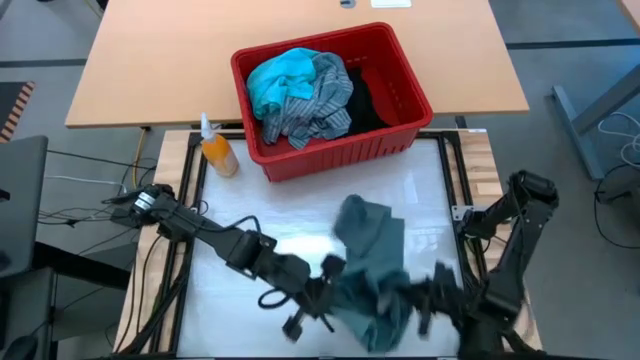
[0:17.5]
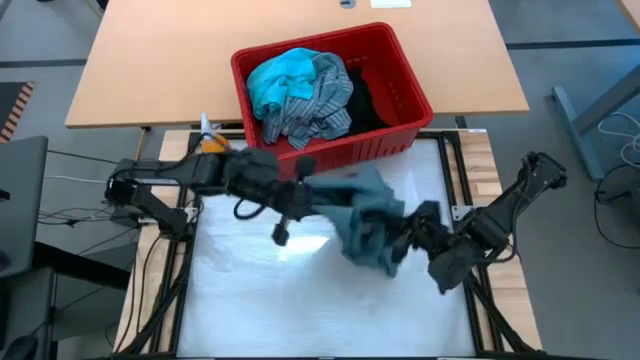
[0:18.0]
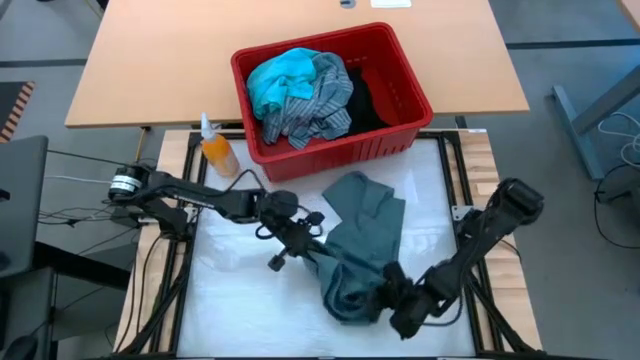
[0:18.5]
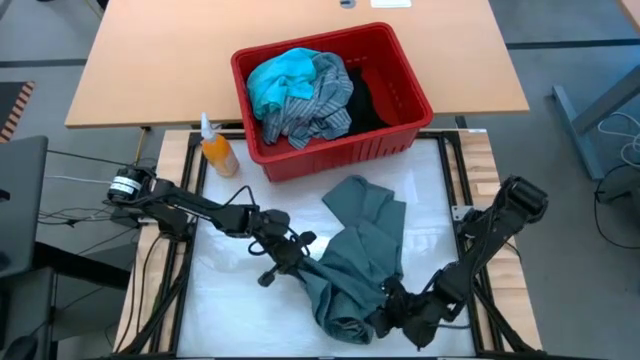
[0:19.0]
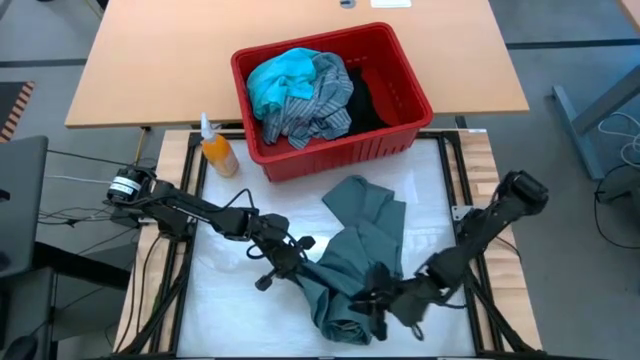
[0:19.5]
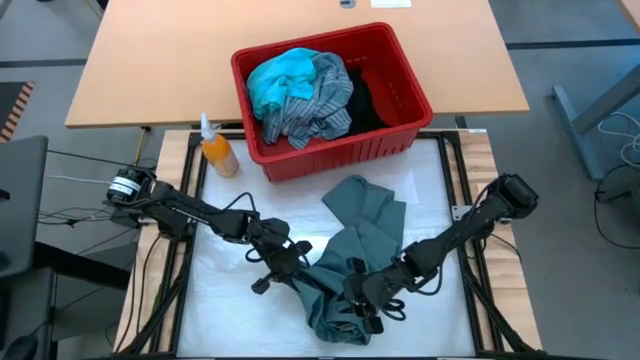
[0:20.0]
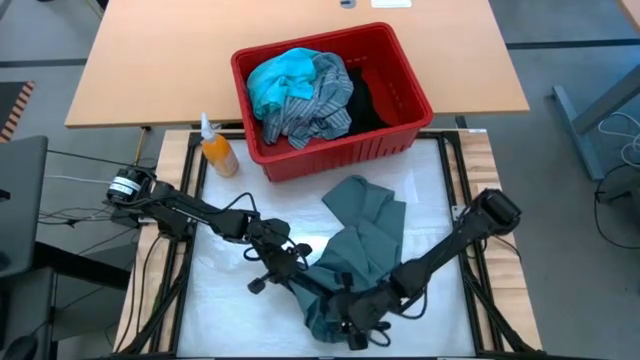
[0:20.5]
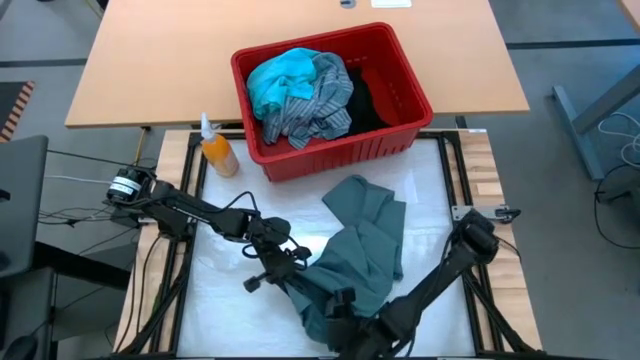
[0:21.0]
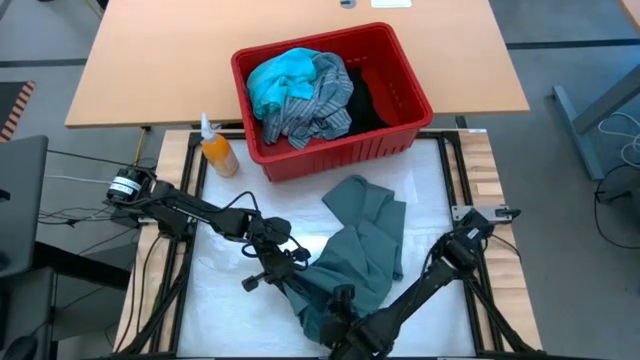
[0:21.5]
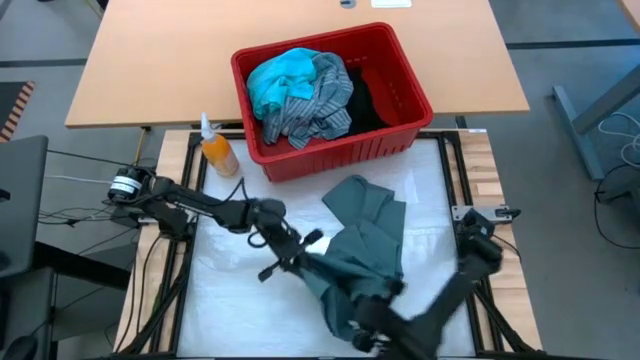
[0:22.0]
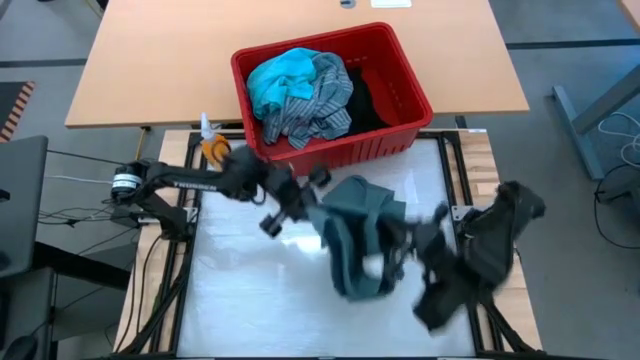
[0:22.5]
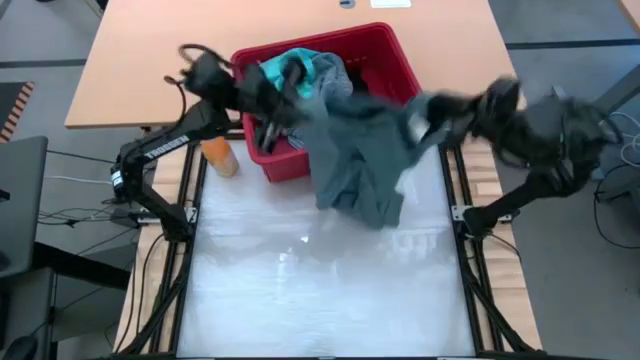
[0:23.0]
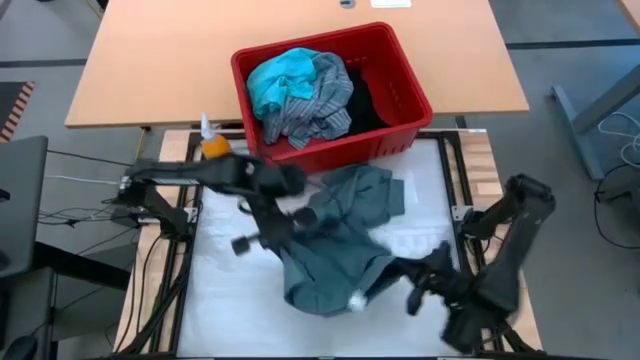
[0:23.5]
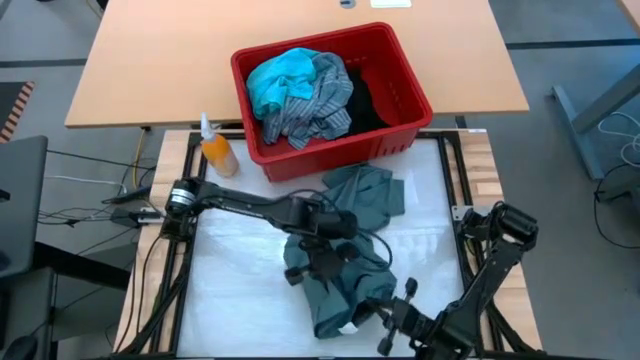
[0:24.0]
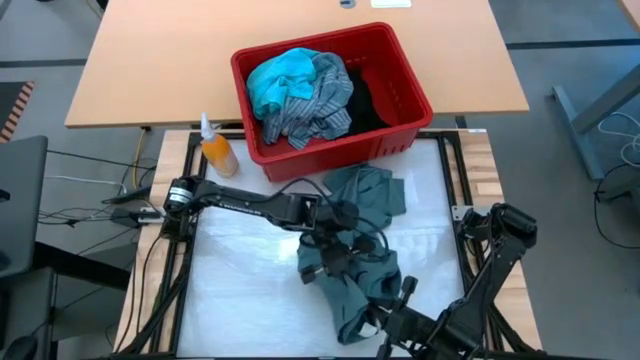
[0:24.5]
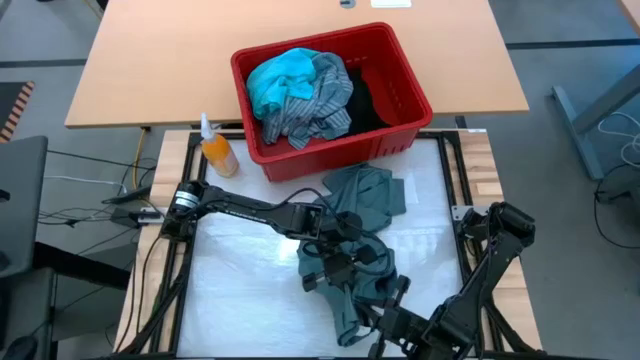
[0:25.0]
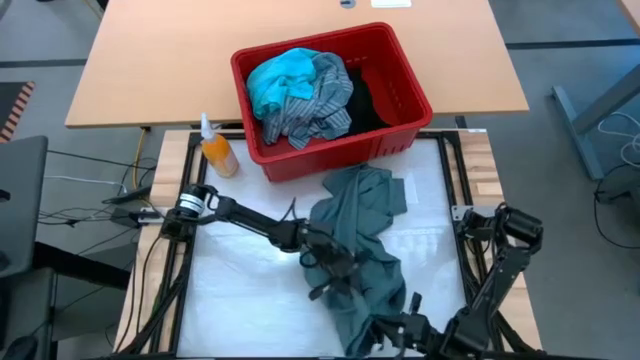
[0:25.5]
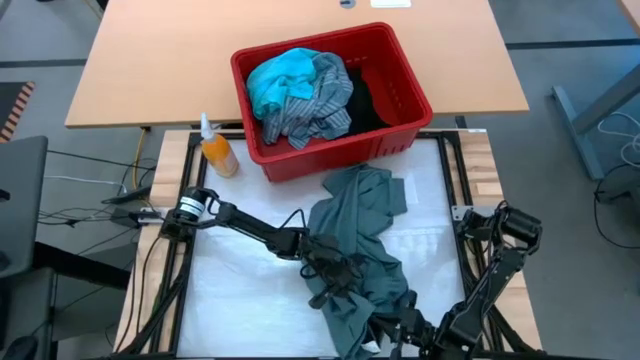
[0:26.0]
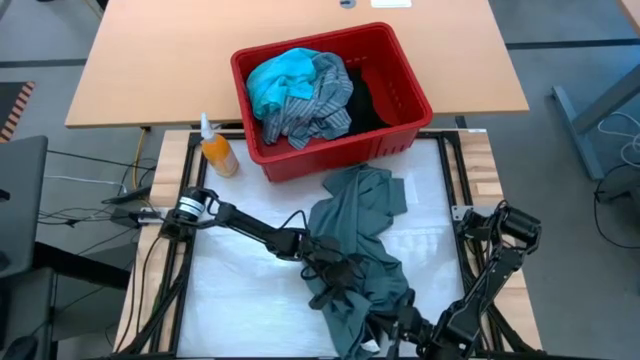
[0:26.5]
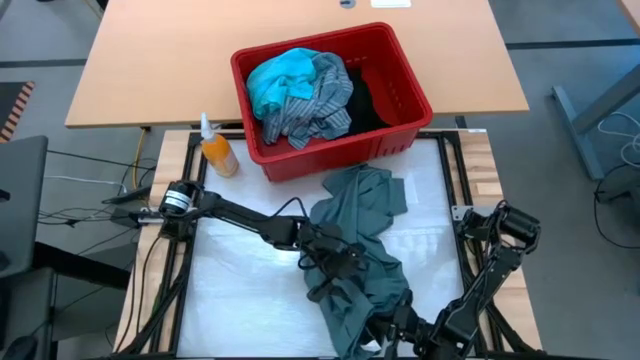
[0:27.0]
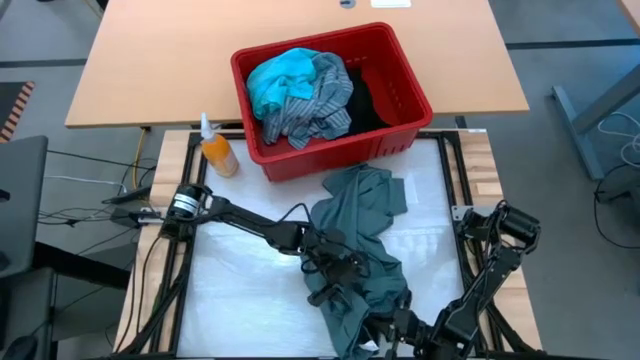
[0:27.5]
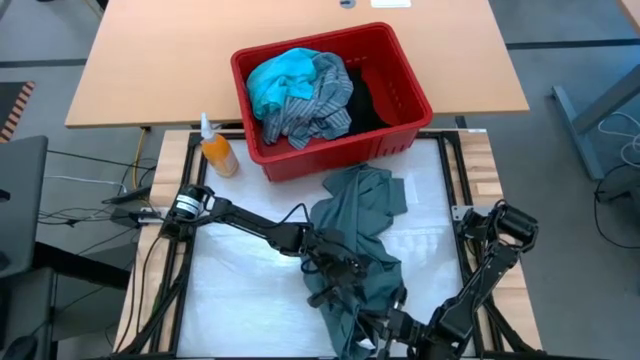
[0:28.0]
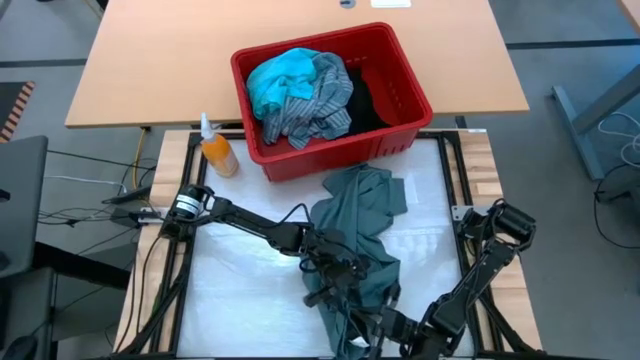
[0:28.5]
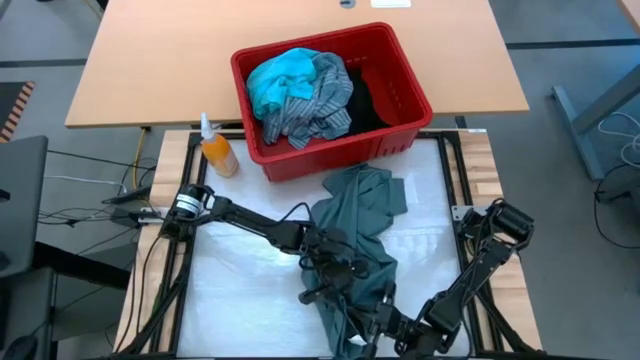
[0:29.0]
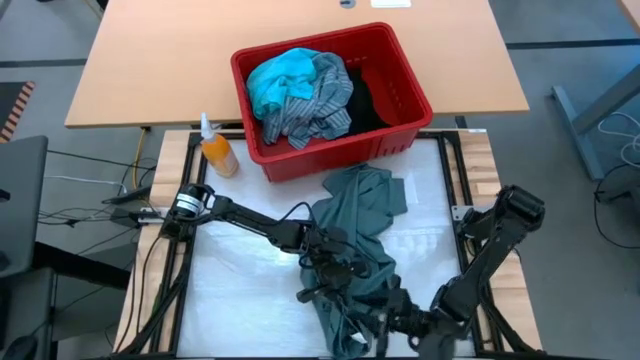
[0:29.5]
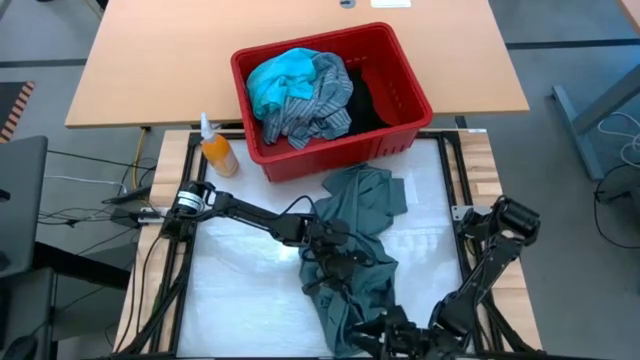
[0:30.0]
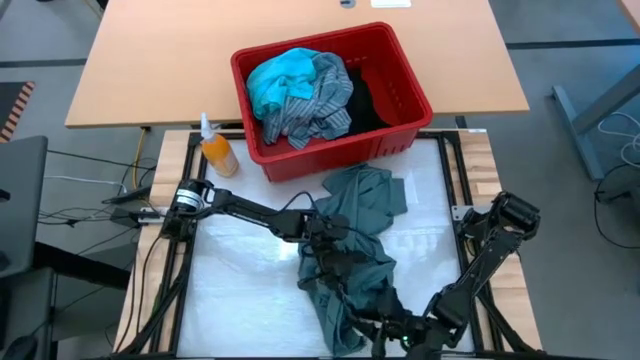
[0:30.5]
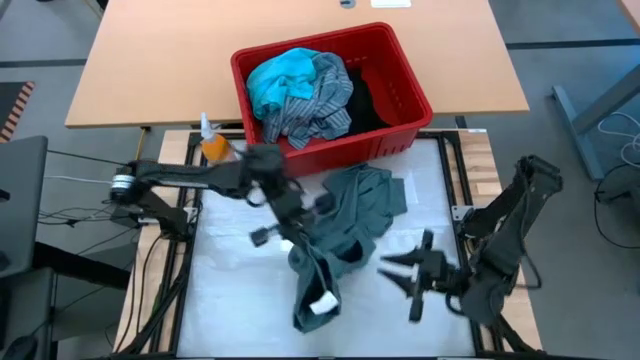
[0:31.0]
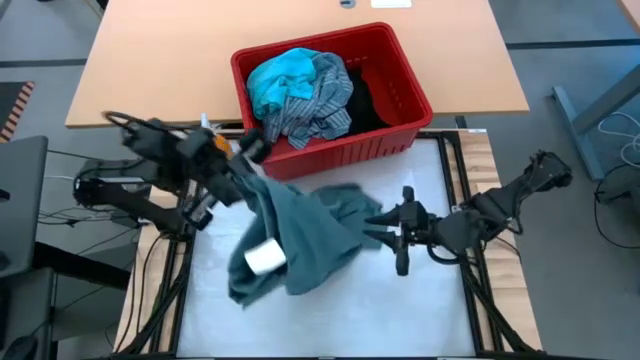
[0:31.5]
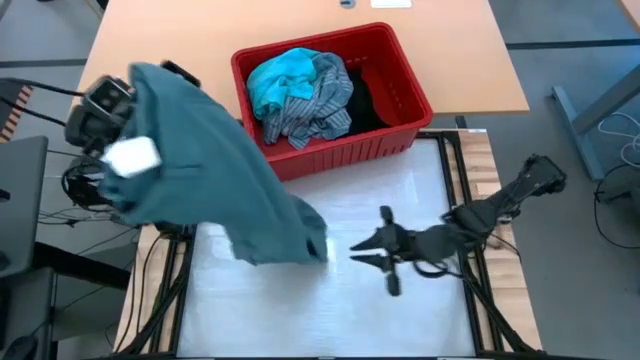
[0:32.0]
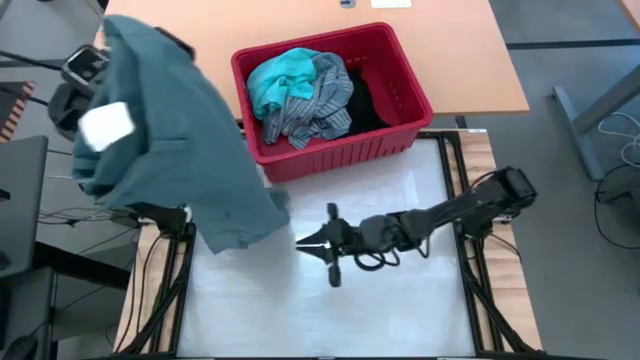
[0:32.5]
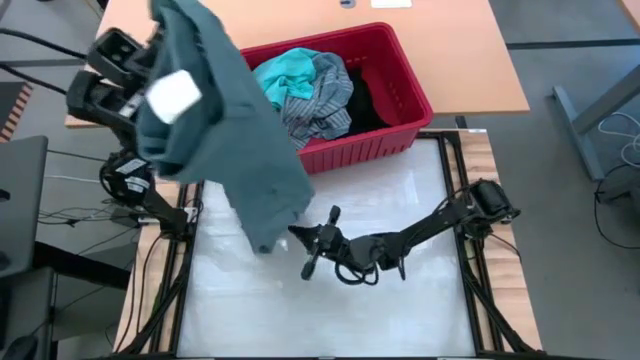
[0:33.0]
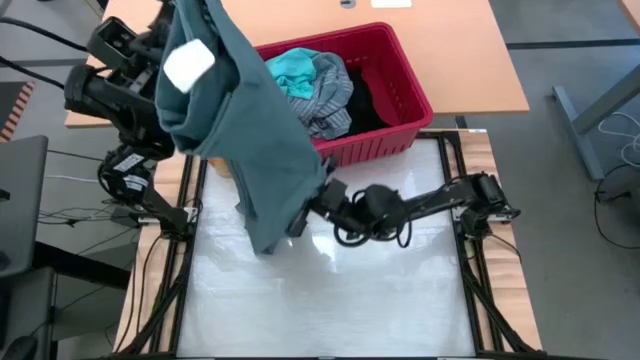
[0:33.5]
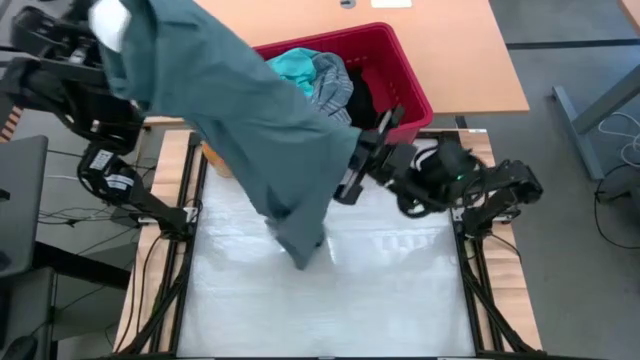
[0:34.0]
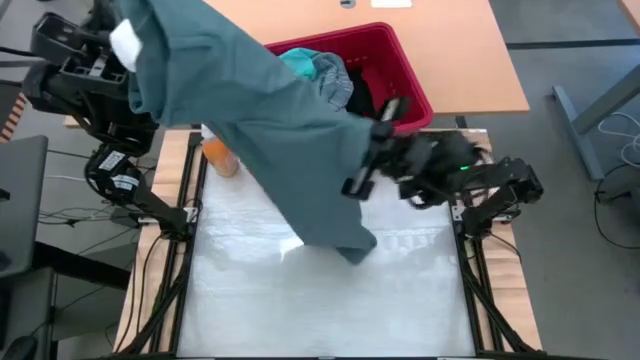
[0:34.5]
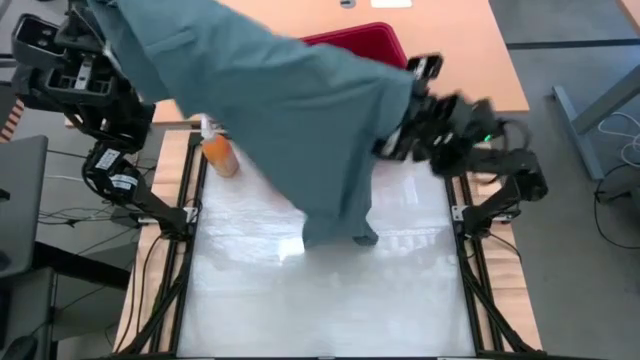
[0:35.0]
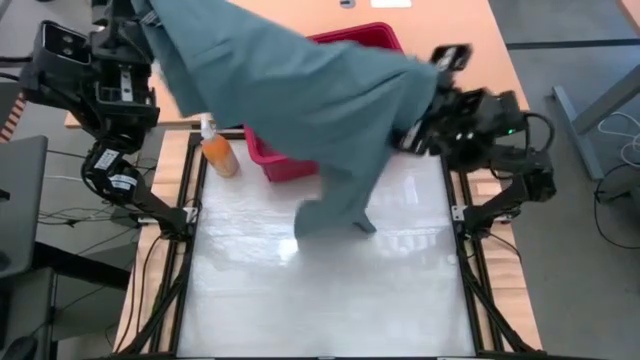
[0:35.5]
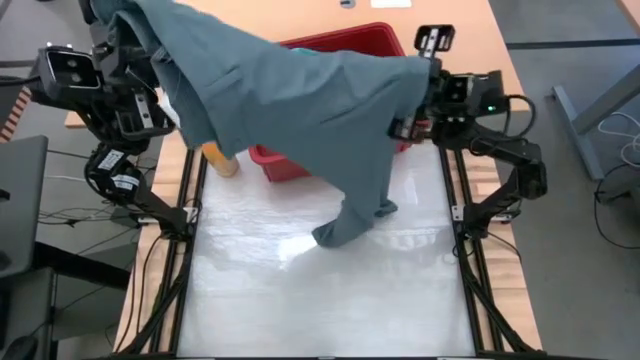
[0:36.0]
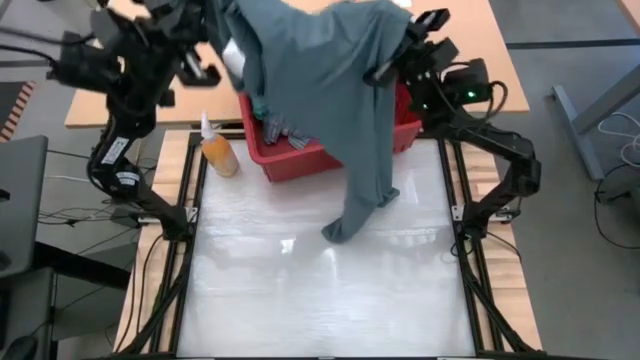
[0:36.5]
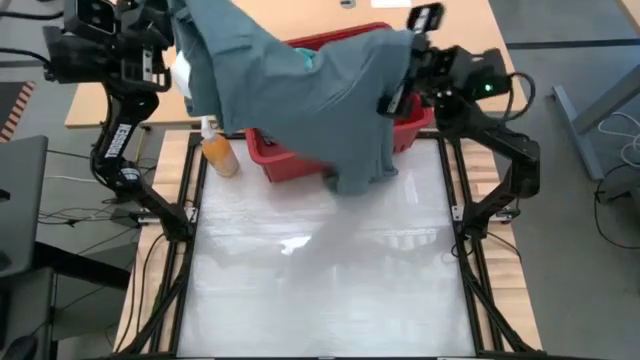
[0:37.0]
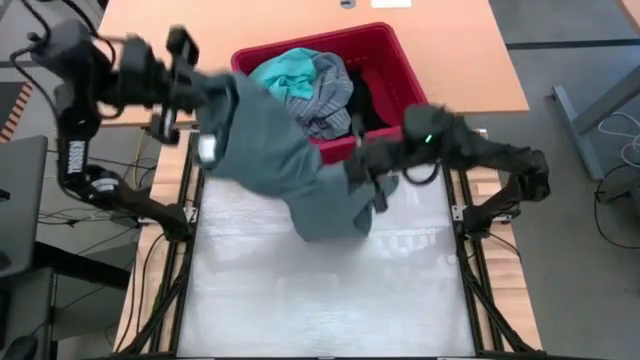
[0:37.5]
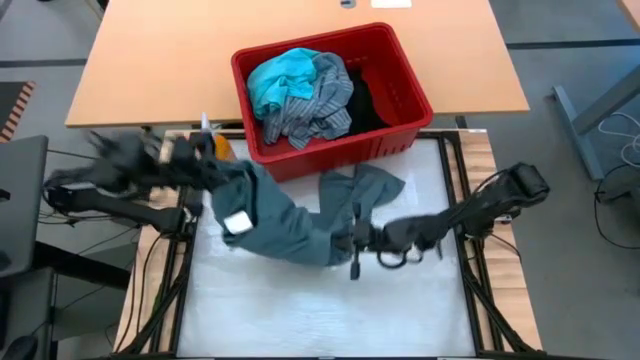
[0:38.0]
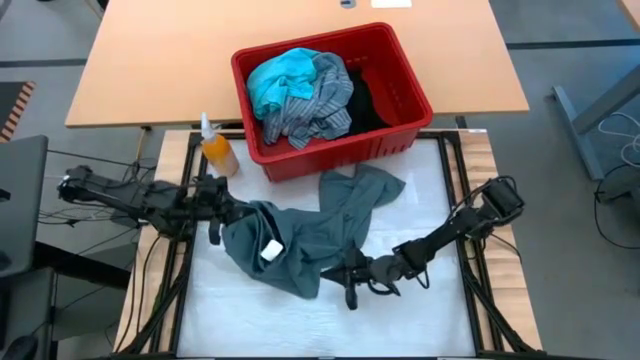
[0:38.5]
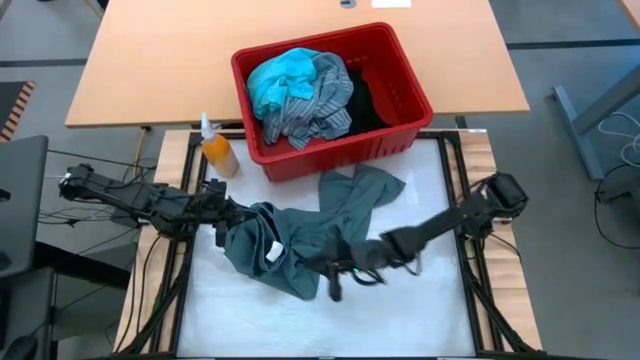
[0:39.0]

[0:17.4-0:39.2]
Task: Fold Laundry from Bin
Fold the dark blue pants
